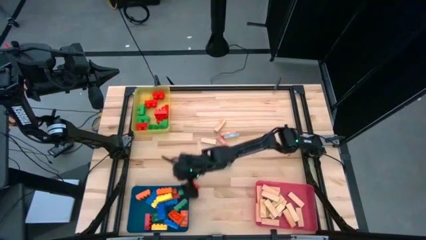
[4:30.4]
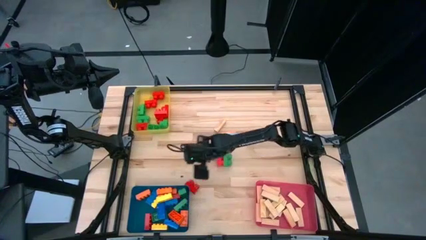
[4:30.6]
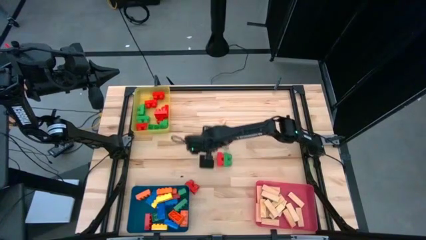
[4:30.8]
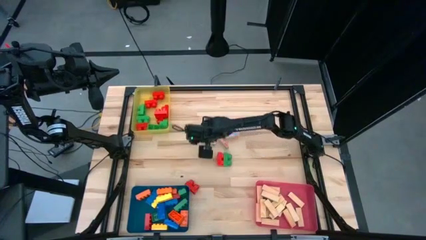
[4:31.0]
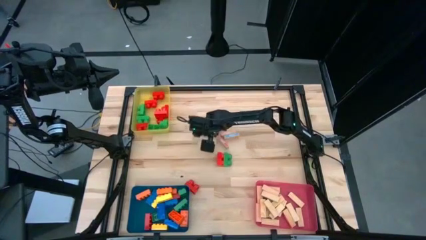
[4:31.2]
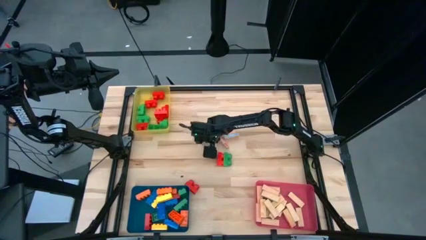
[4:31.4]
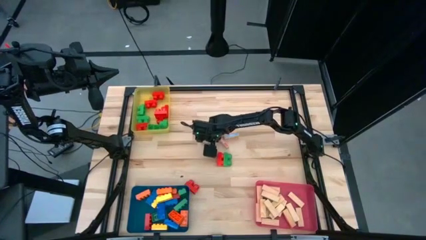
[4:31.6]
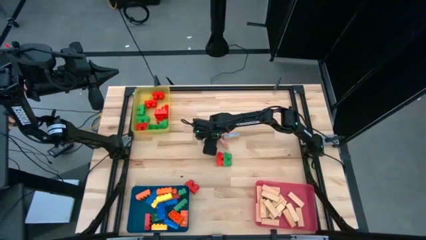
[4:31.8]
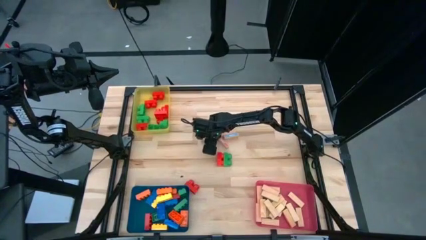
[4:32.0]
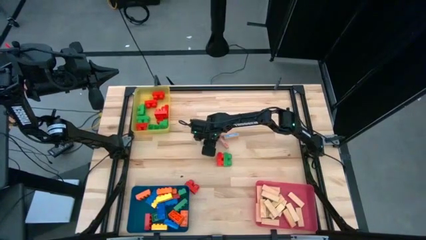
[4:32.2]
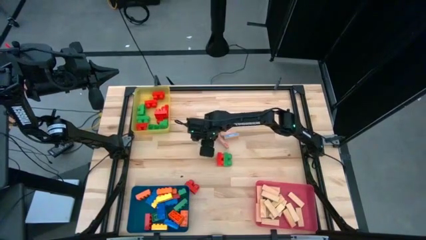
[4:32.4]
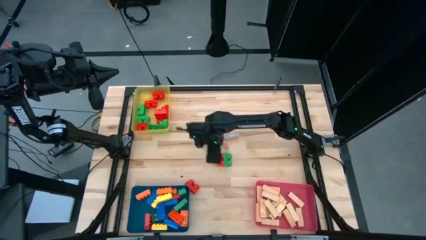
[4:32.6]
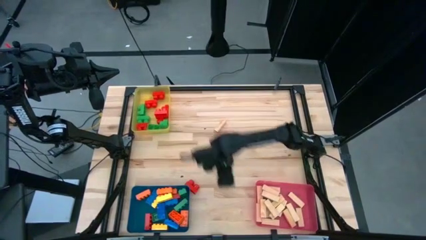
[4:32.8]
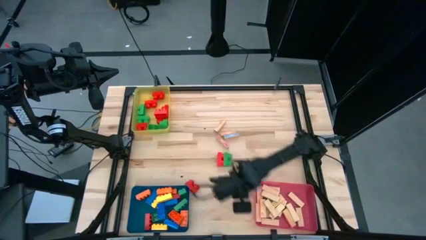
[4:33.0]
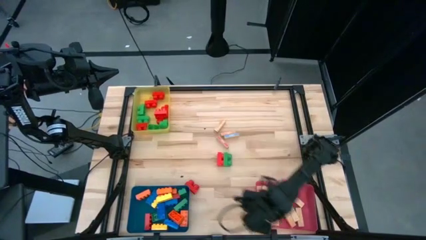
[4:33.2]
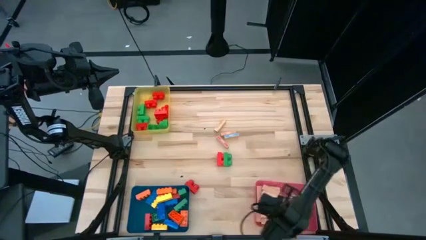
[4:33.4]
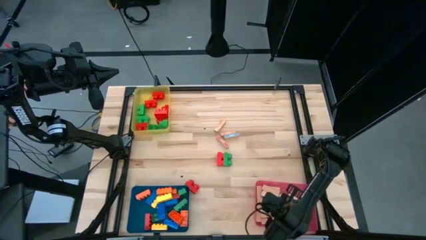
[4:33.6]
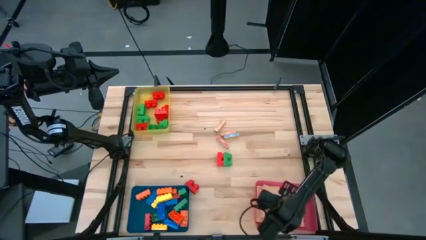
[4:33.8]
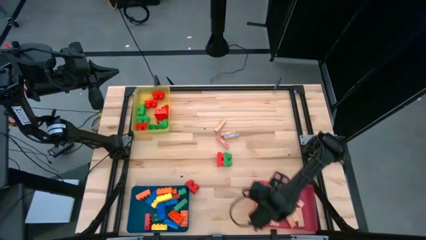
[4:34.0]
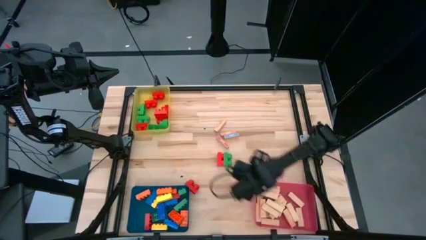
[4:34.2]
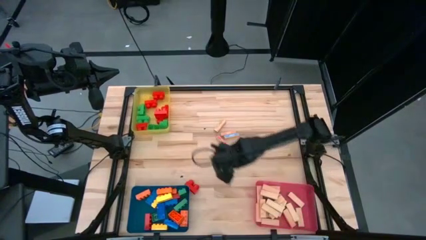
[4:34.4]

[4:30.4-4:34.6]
Task: Sort blocks by size
Put the wooden block into the red bin

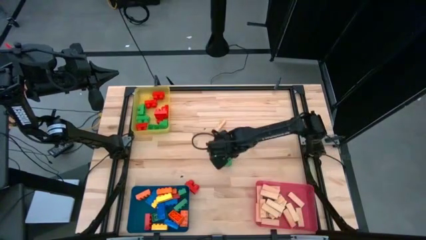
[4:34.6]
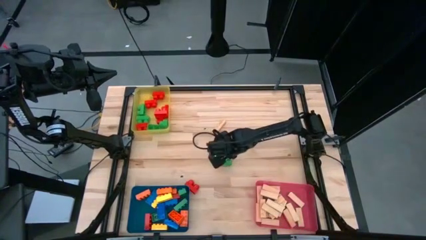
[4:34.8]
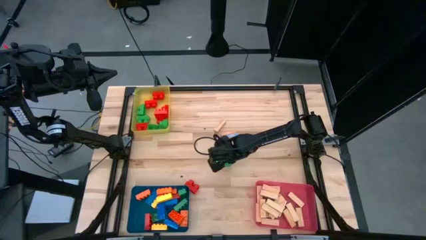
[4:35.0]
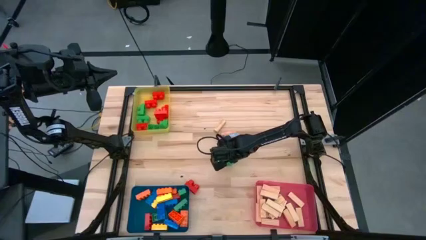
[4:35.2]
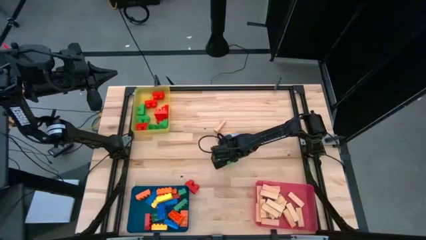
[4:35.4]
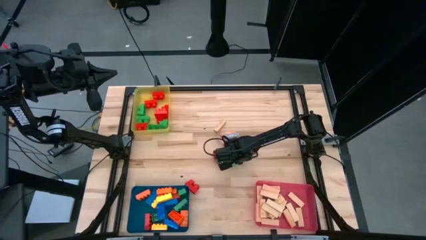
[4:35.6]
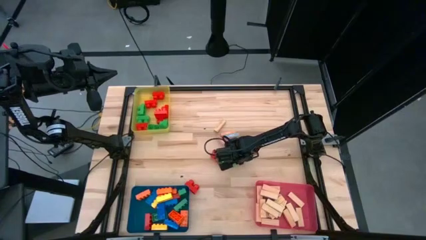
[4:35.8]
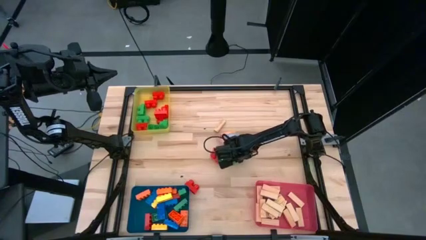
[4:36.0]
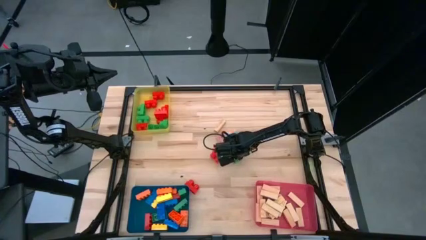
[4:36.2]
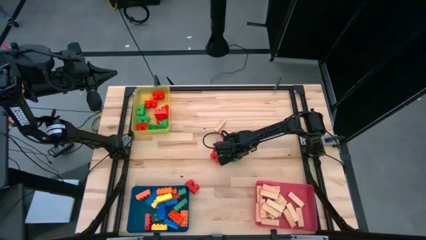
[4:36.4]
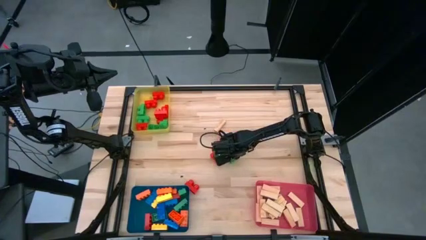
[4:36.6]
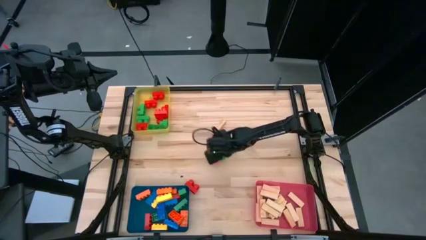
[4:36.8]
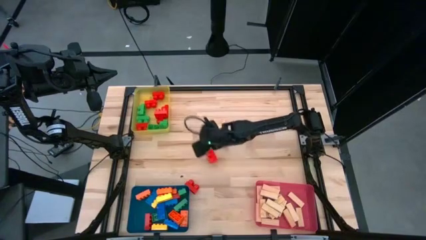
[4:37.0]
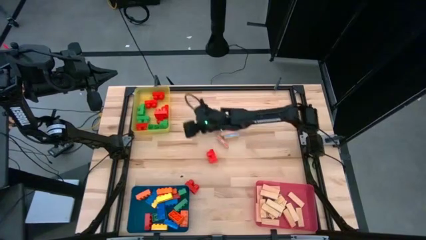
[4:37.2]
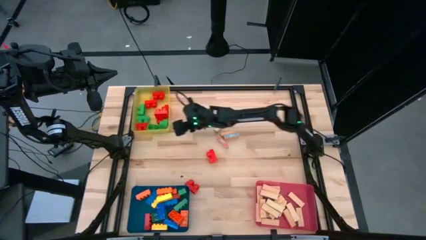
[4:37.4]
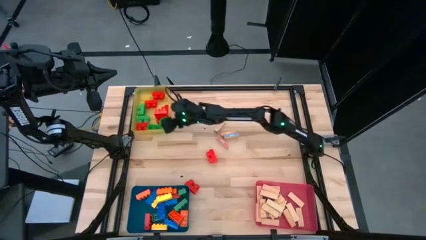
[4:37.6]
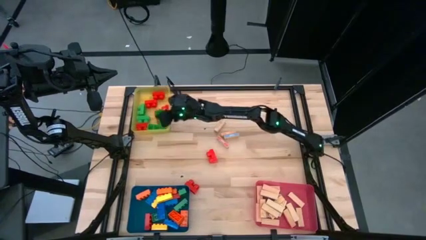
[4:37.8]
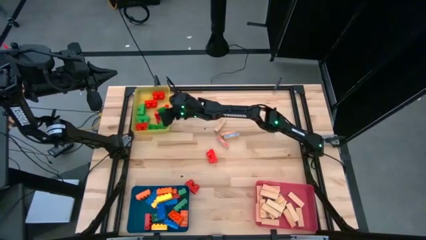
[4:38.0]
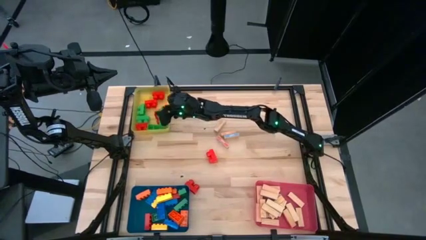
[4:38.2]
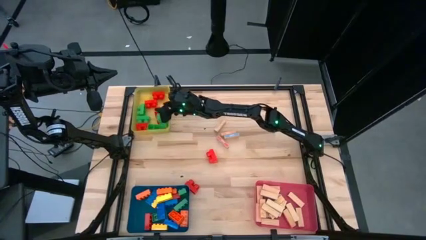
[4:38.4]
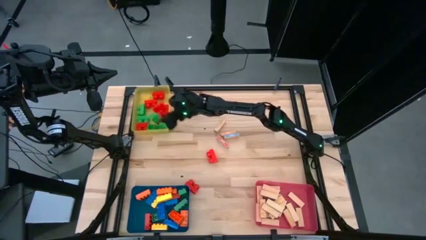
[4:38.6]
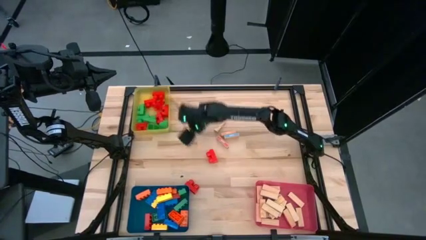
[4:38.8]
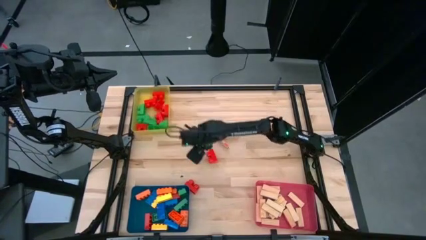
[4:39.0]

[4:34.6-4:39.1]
Put the round green game piece into the yellow bin

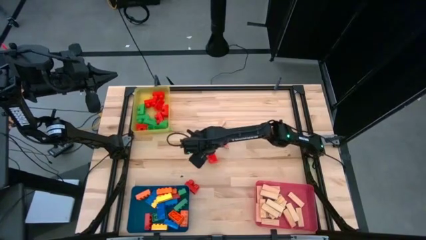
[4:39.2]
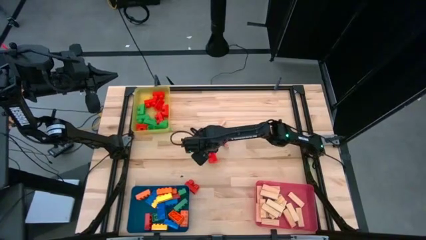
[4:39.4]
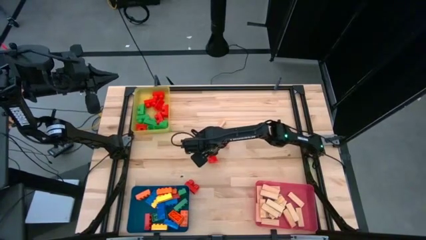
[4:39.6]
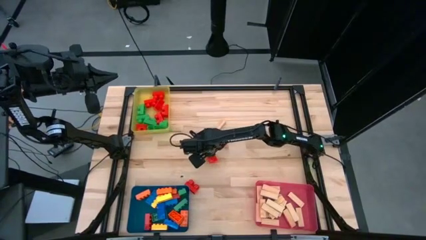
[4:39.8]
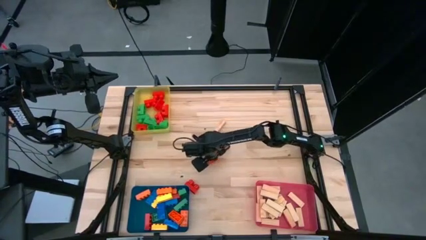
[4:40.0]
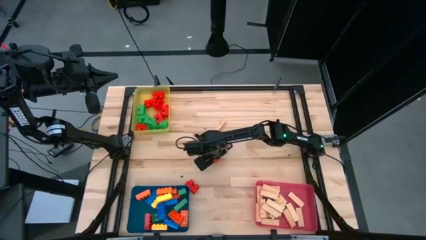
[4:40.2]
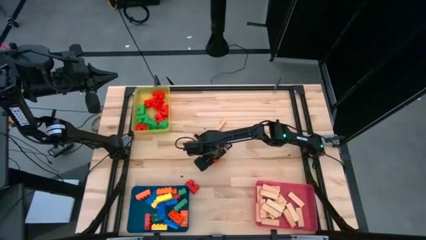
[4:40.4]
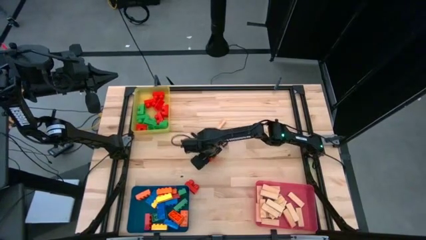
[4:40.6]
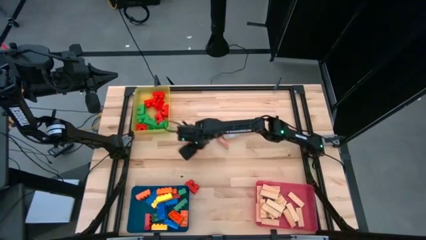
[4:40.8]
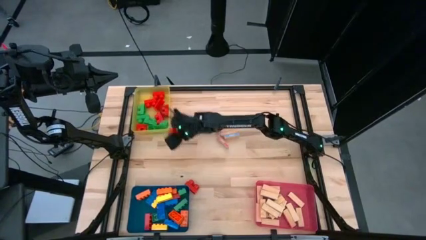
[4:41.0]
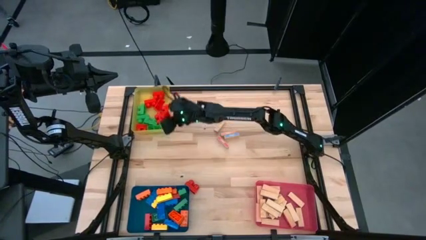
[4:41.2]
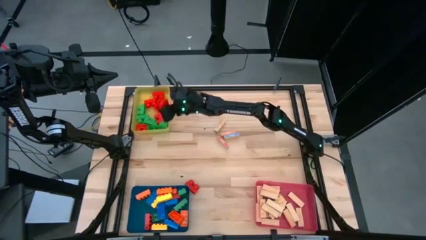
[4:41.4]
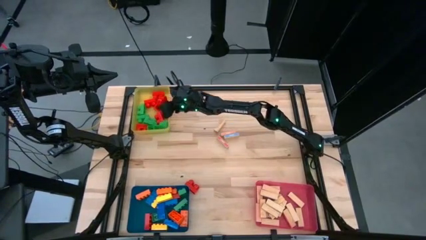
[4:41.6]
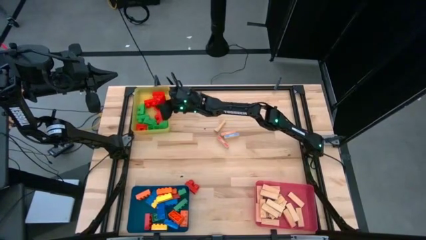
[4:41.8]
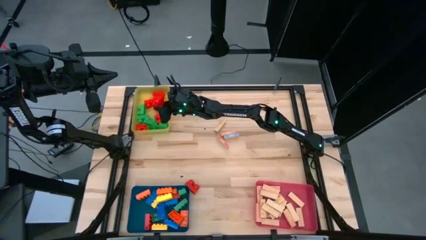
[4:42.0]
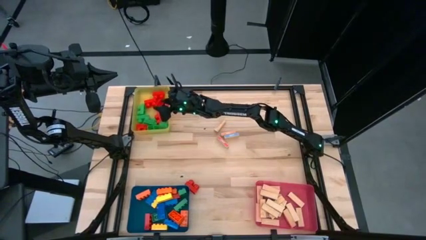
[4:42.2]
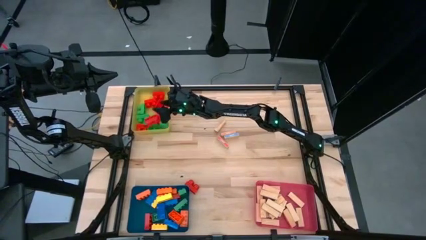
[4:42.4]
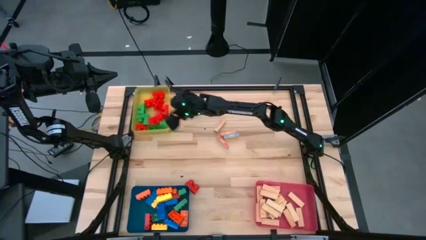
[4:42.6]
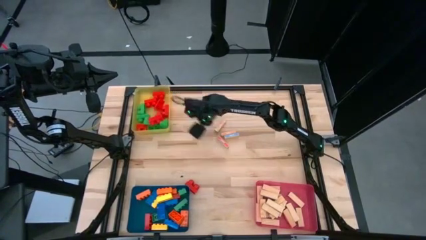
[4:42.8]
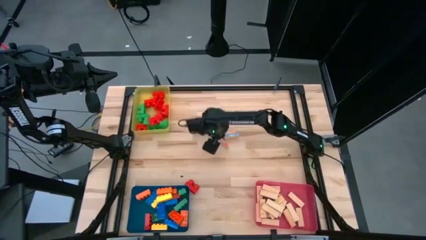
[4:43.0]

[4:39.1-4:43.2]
Put the round orange game piece into the yellow bin

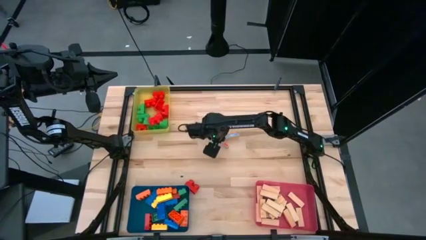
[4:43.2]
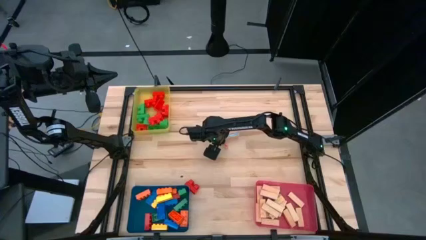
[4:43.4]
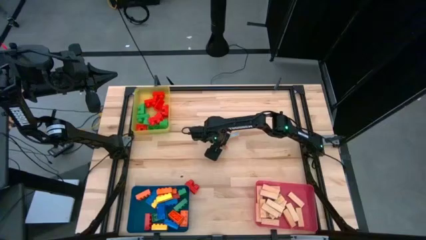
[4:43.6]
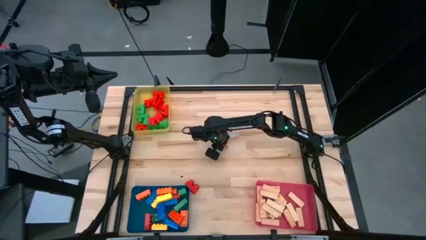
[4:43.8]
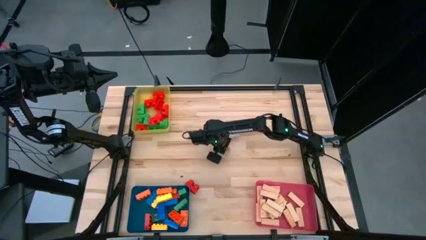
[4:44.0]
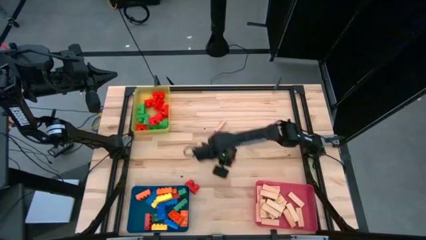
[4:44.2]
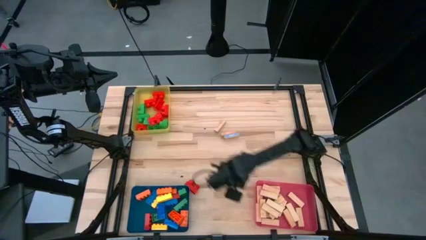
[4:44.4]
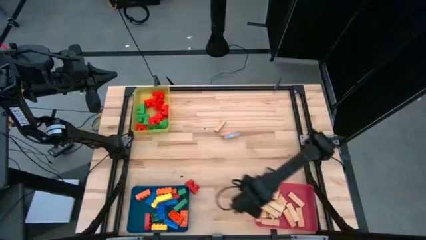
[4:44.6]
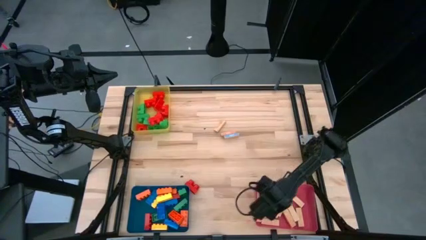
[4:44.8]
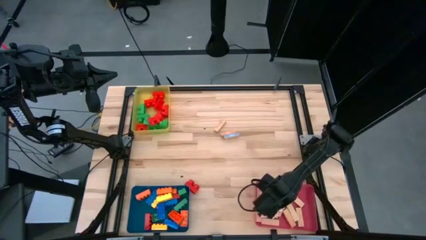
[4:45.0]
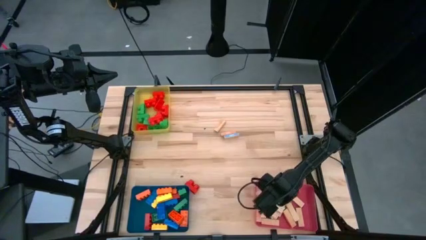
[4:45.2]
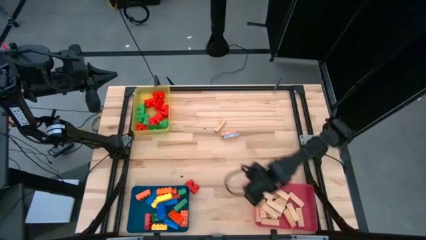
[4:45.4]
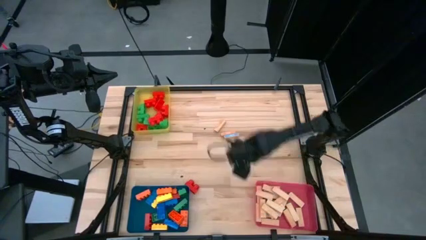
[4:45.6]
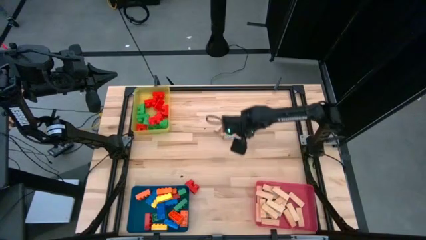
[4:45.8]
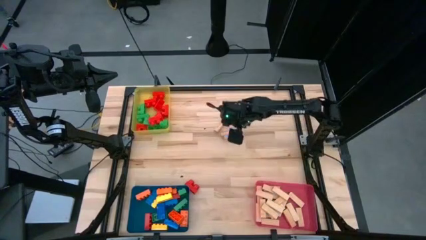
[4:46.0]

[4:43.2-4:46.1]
Put the wooden block into the red bin

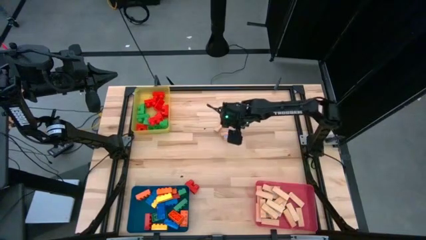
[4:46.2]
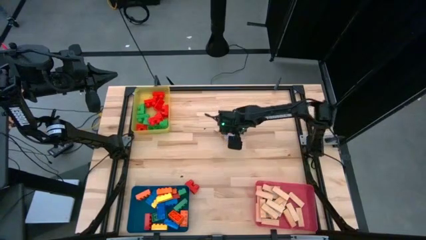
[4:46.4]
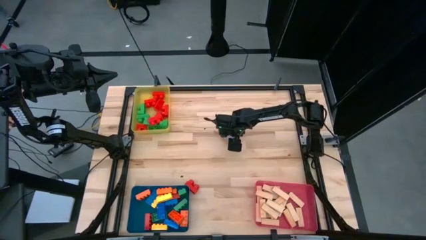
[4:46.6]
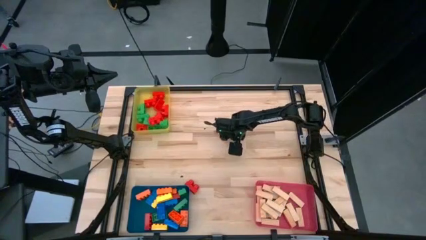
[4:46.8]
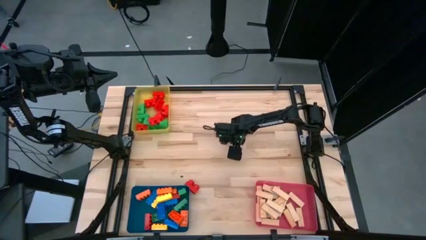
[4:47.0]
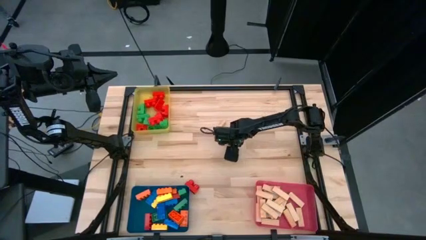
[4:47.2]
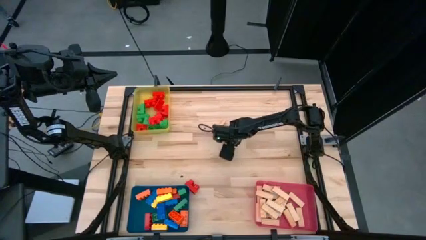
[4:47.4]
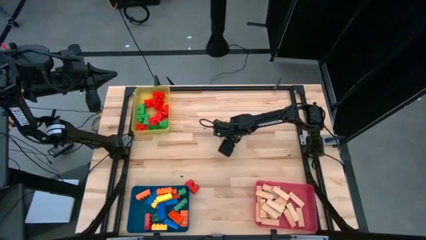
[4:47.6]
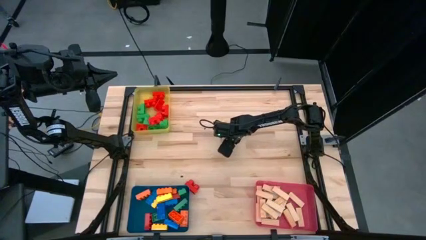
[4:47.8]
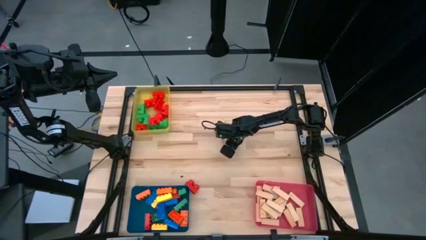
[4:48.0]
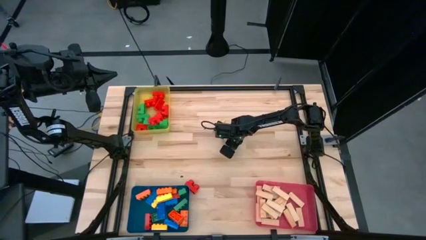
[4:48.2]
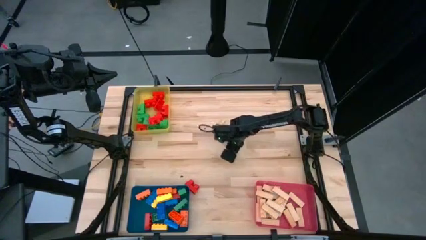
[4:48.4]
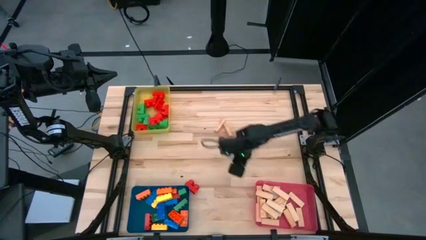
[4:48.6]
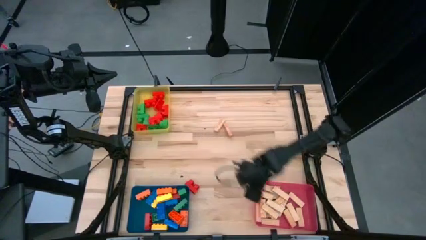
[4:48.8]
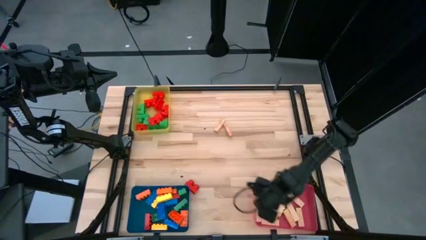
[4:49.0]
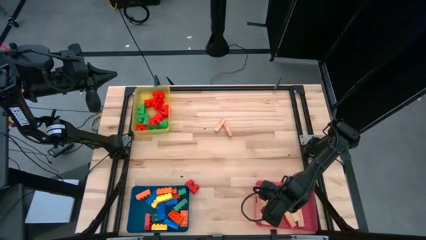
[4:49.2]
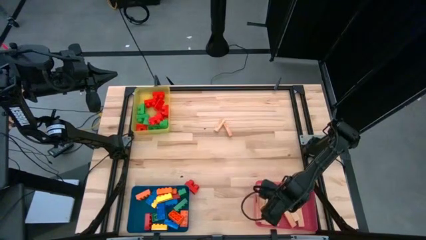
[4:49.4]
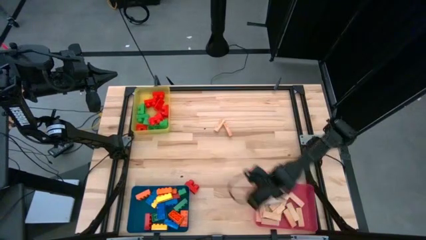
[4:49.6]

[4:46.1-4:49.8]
Put the wooden block into the red bin
